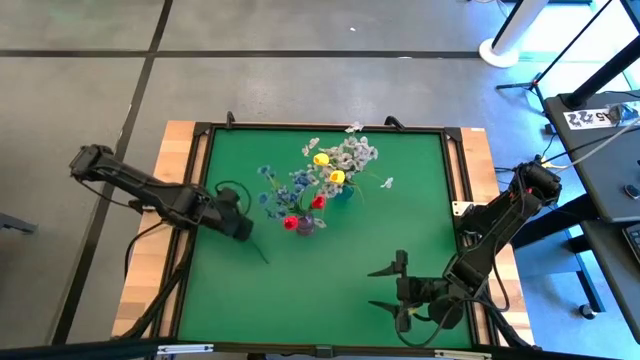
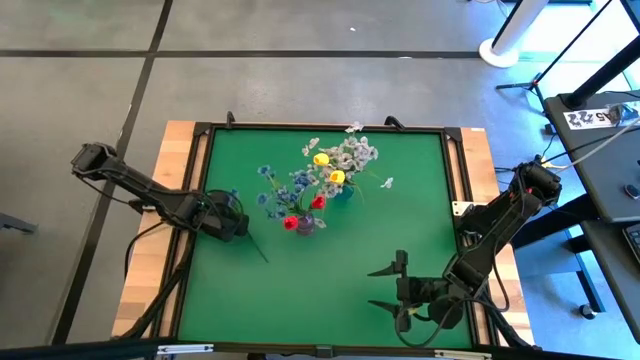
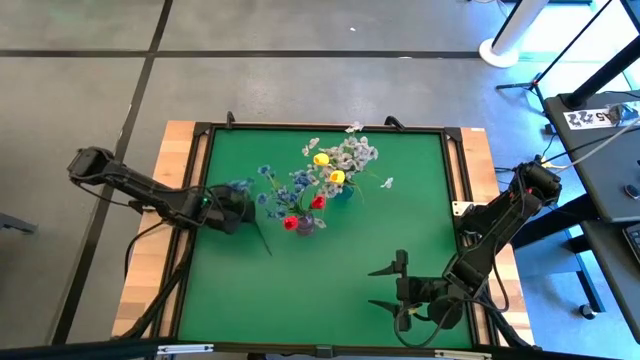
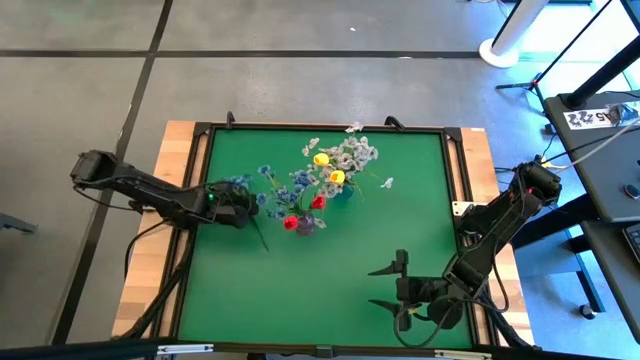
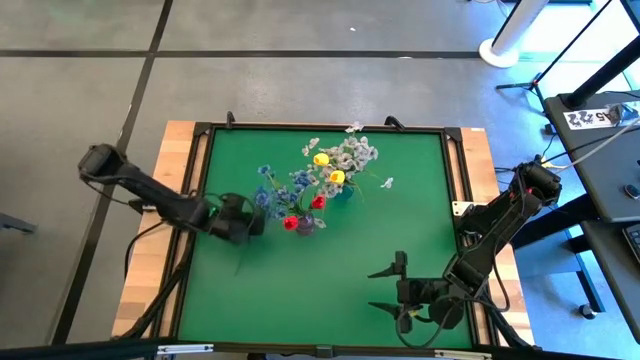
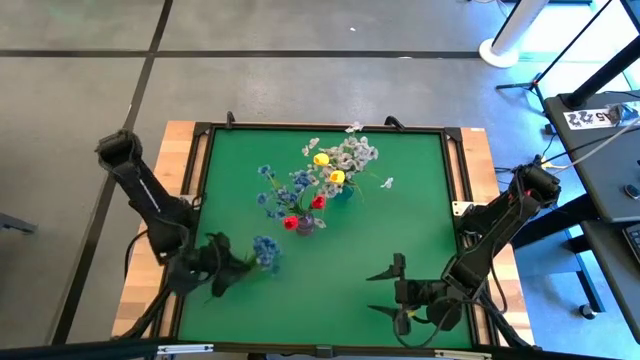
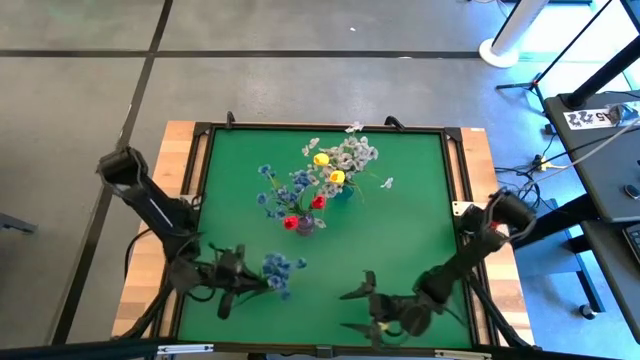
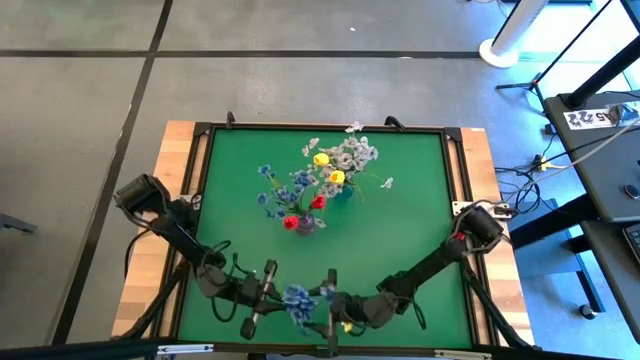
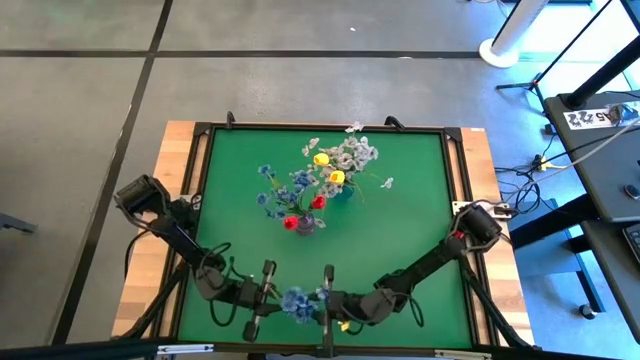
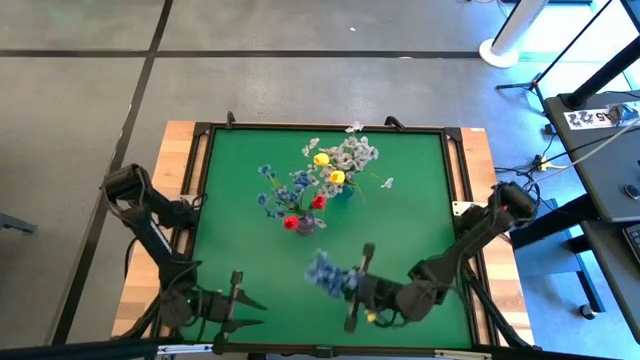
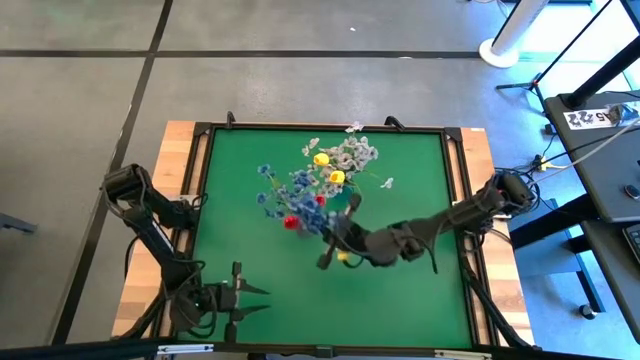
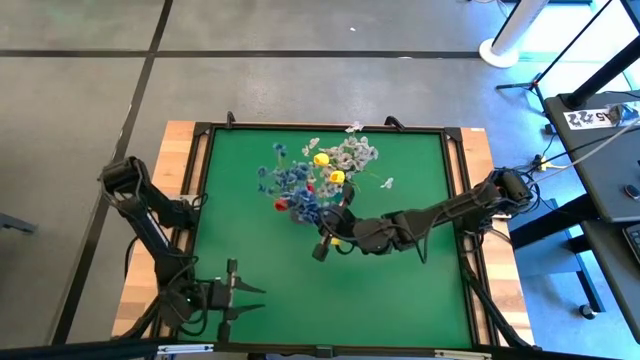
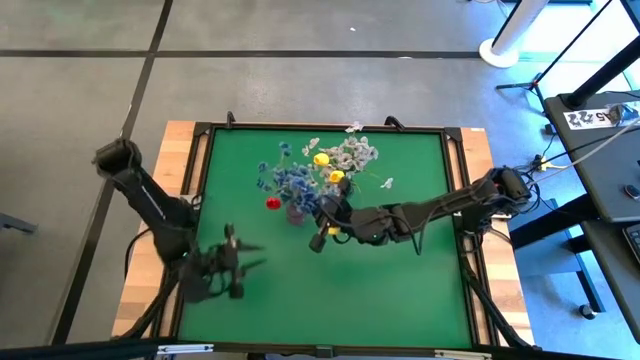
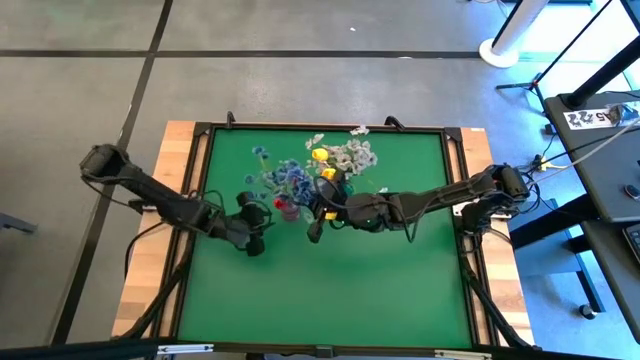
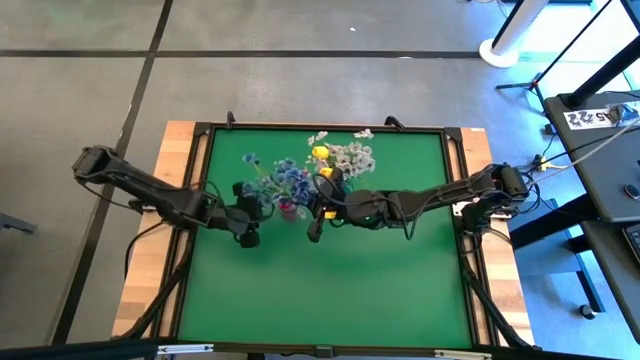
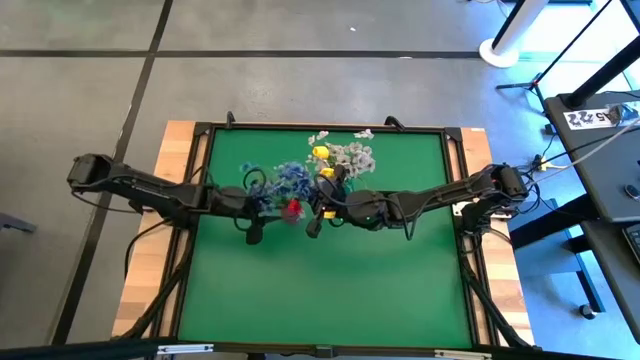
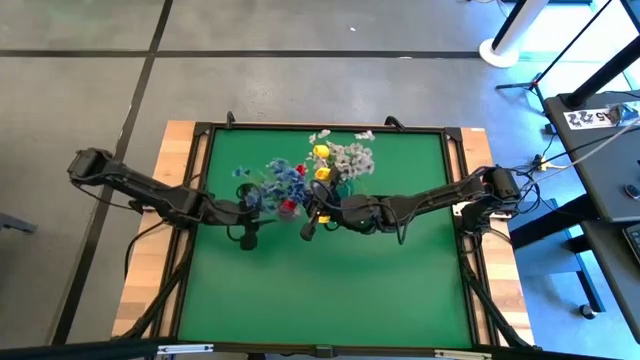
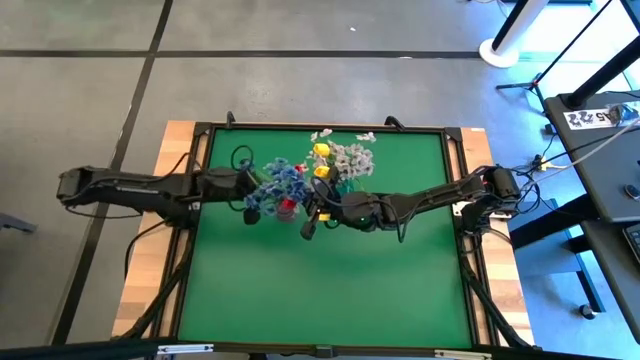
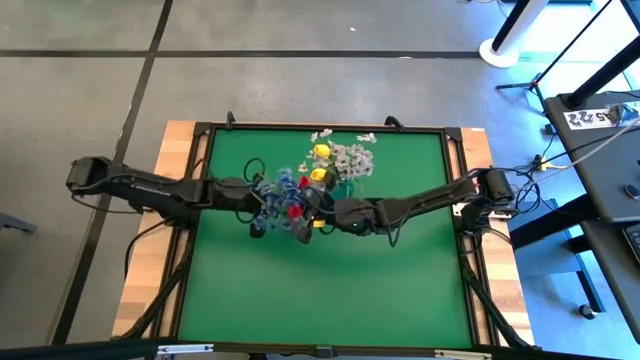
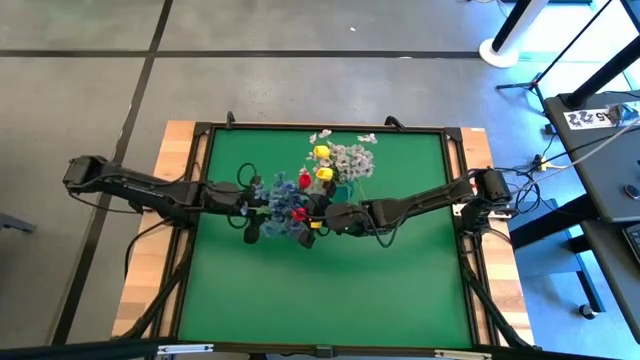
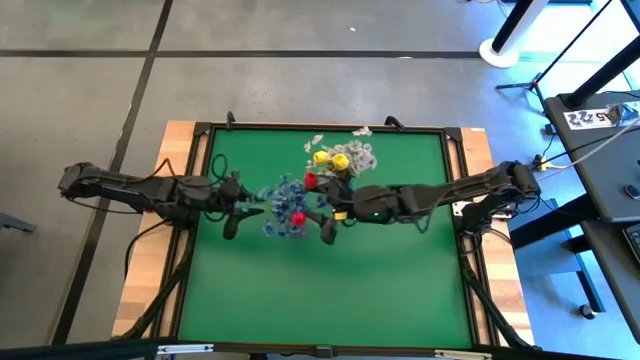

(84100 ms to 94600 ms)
Task: Sort flowers into vase by color
Put the blue flowers into the purple vase

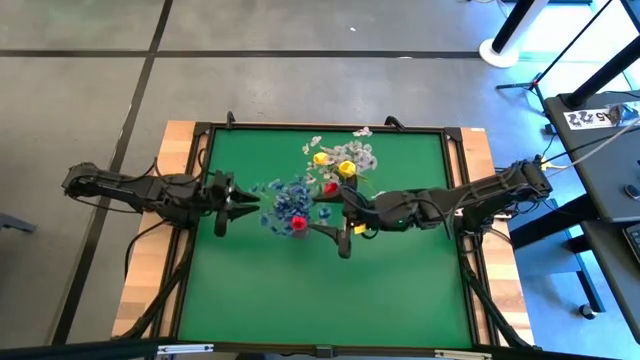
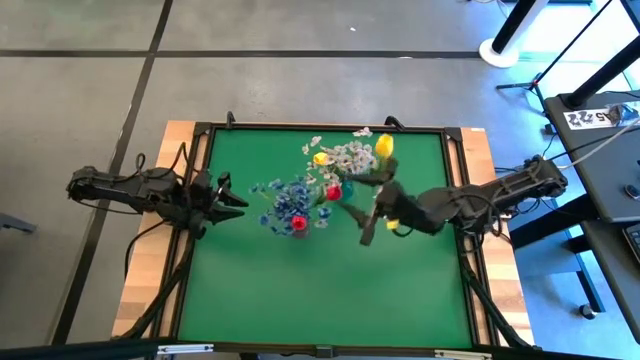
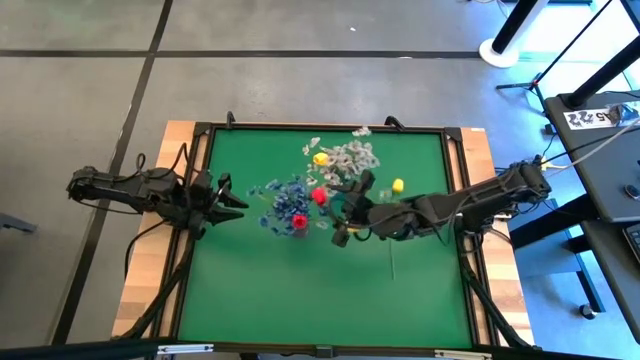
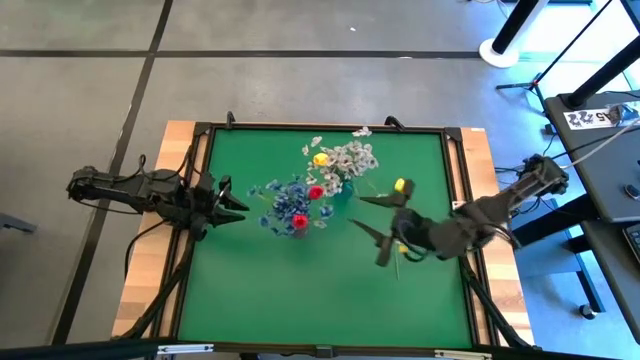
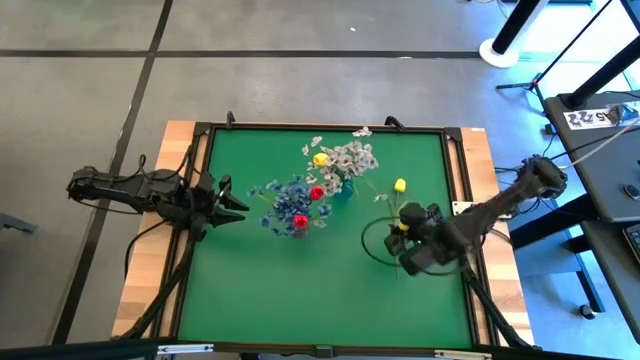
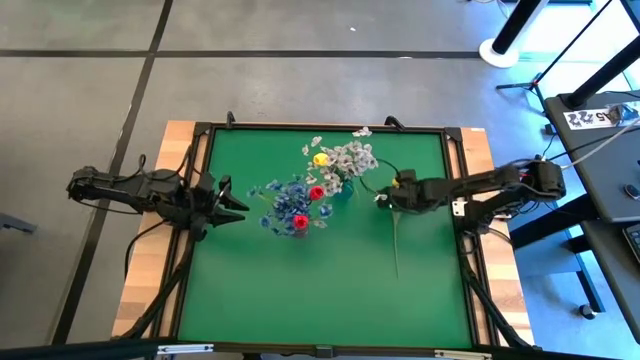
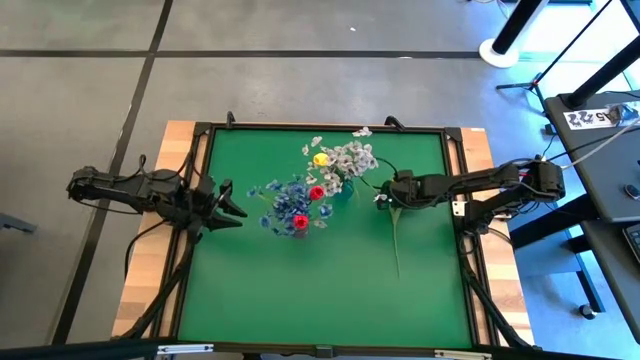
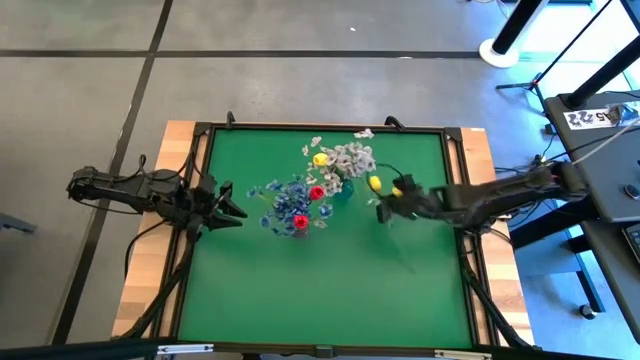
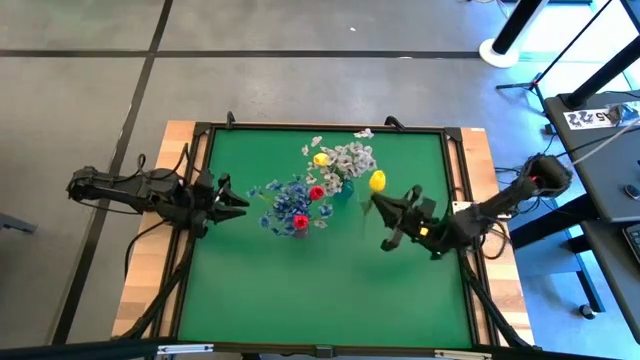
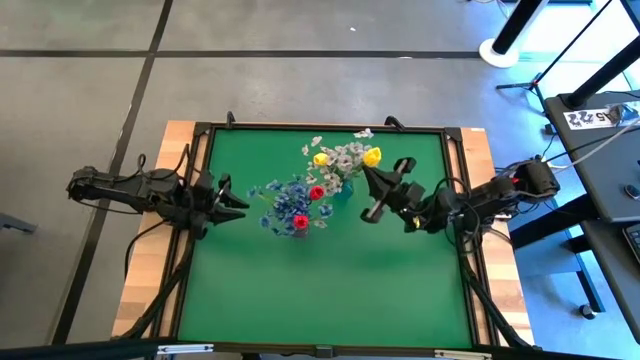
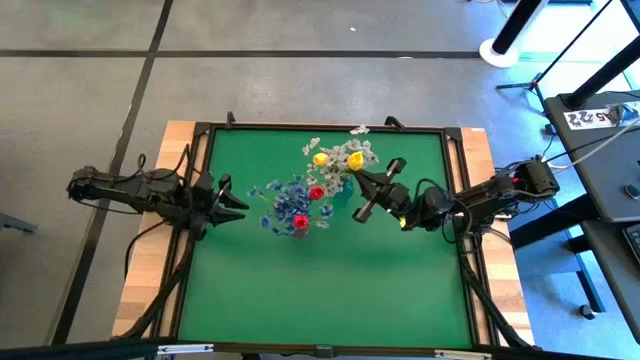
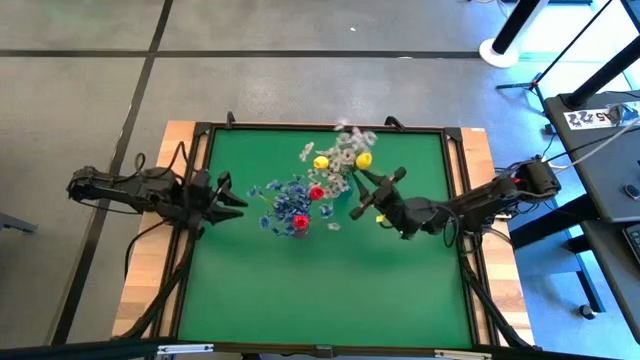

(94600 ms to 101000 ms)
Put the yellow tulip into the blue vase

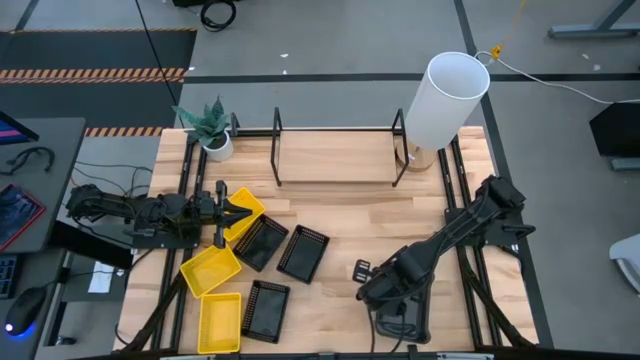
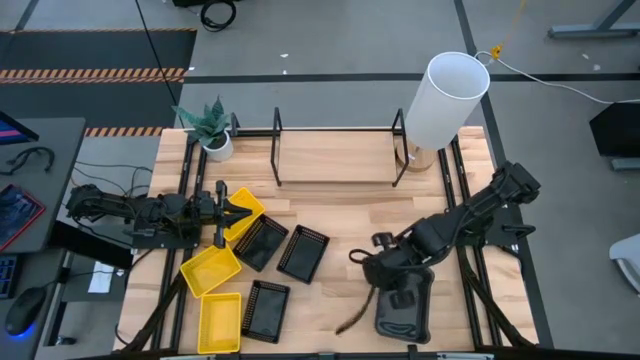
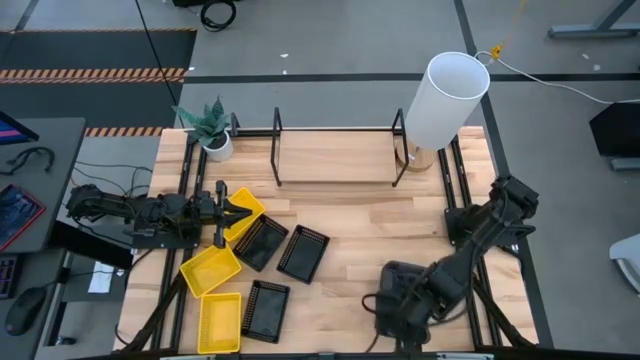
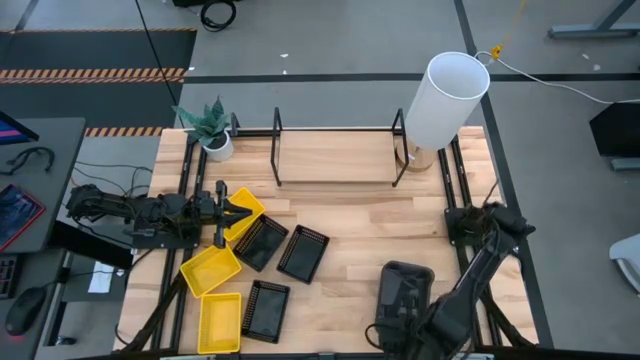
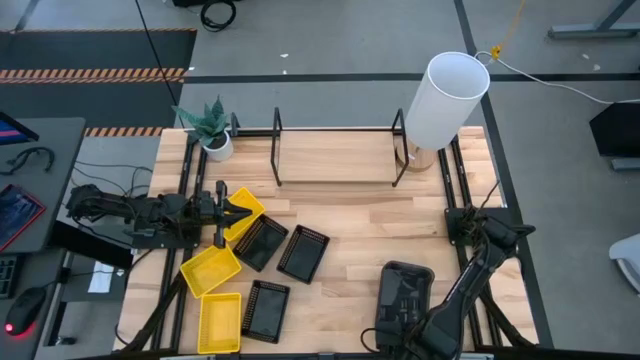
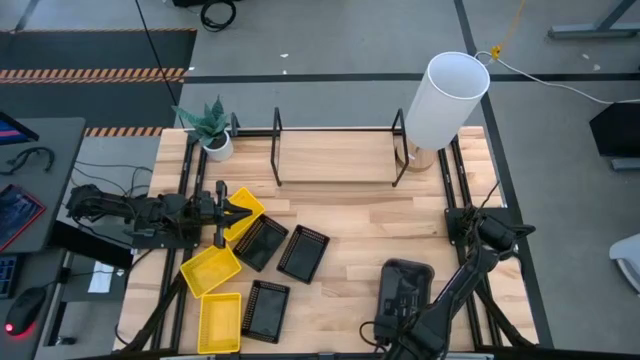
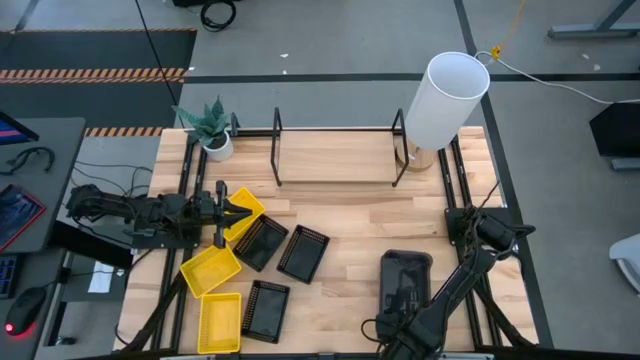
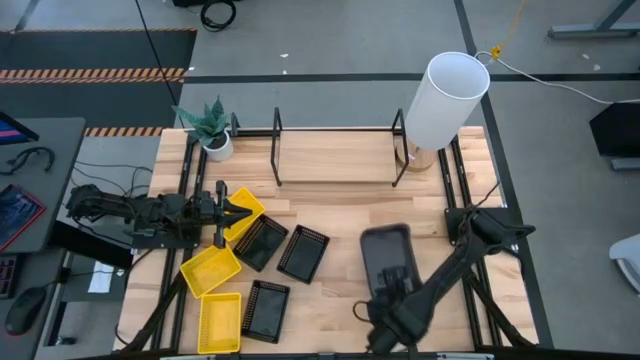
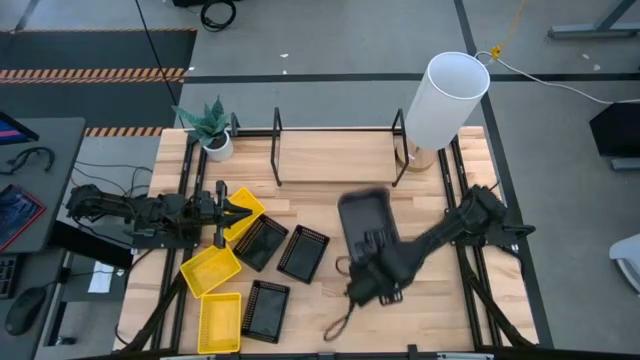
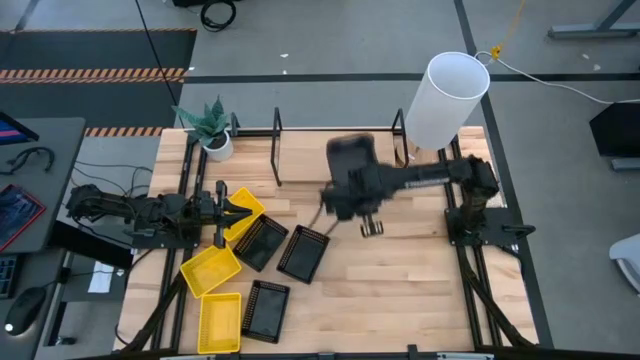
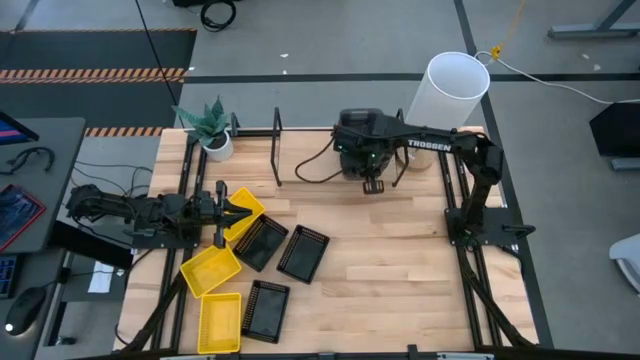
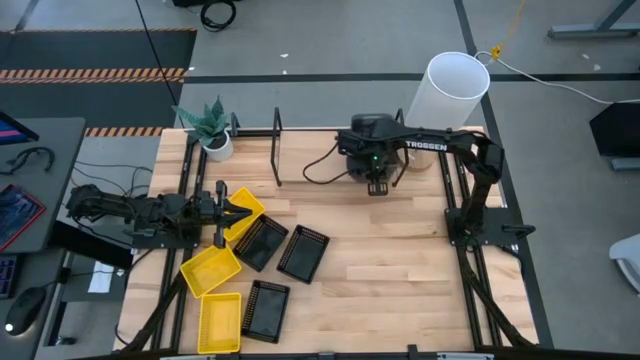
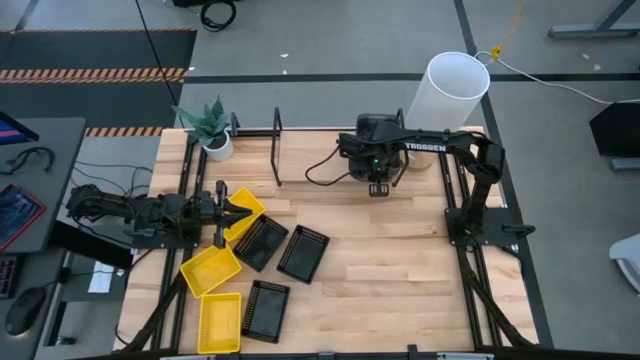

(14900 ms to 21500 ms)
Task: Stack baskets on shelf by color
Put the stacked black bins on the shelf
